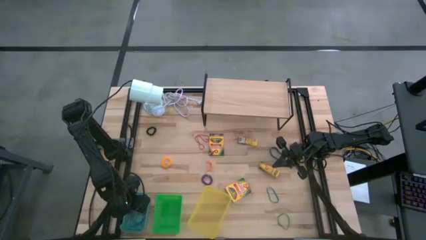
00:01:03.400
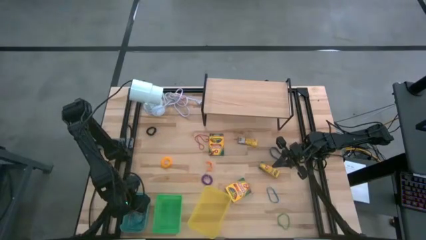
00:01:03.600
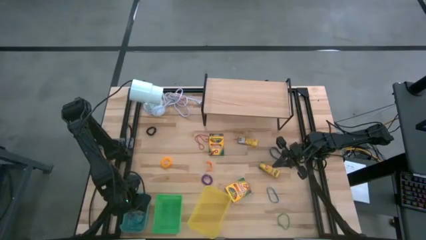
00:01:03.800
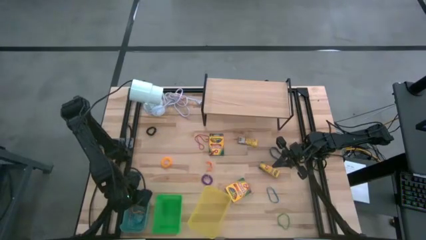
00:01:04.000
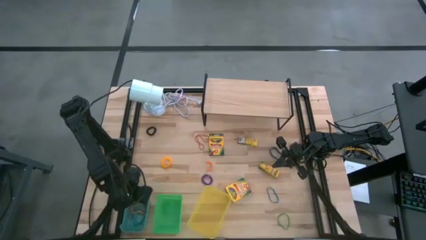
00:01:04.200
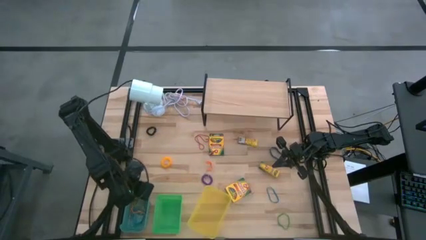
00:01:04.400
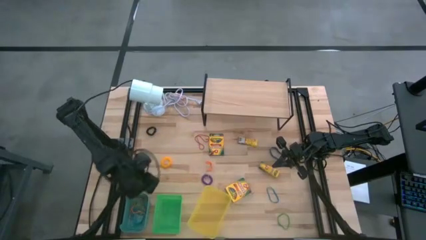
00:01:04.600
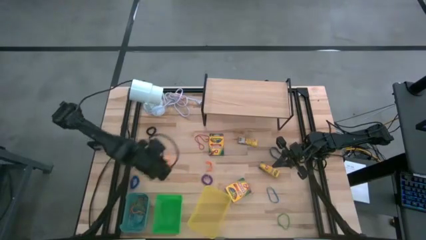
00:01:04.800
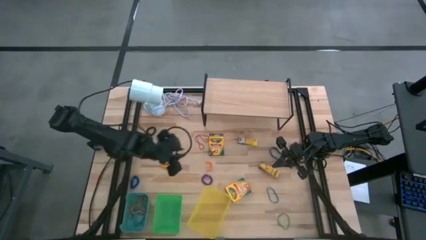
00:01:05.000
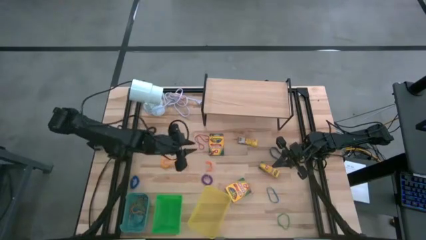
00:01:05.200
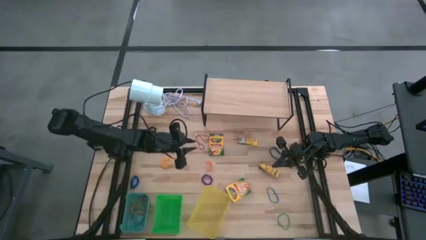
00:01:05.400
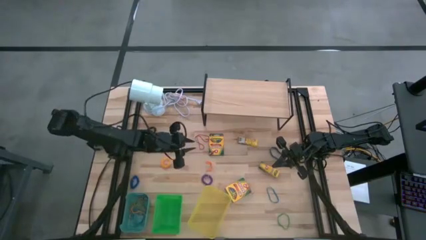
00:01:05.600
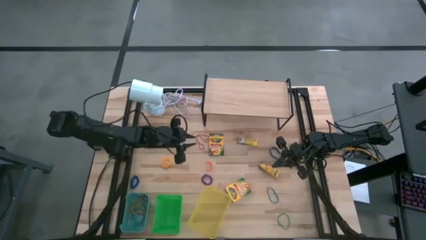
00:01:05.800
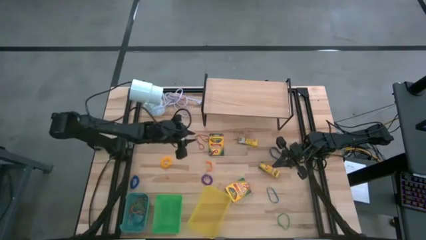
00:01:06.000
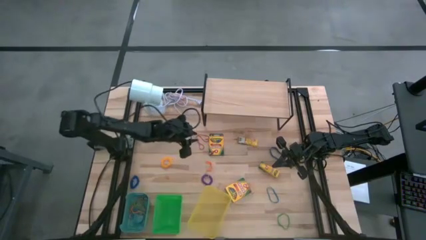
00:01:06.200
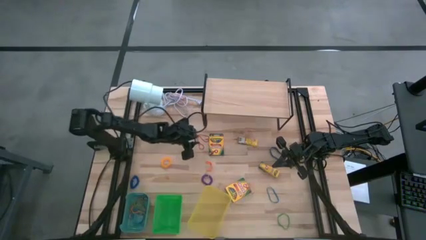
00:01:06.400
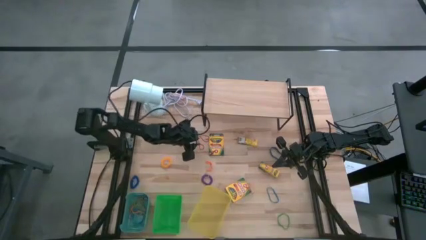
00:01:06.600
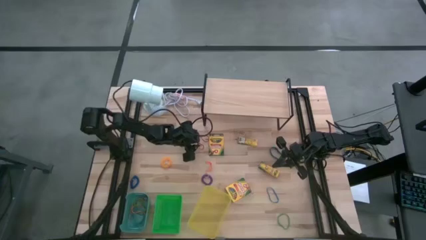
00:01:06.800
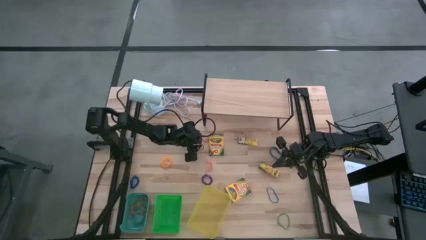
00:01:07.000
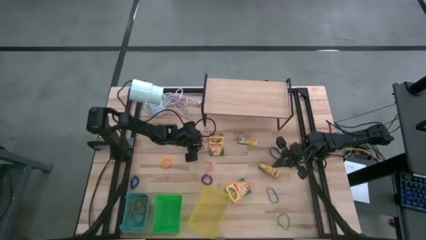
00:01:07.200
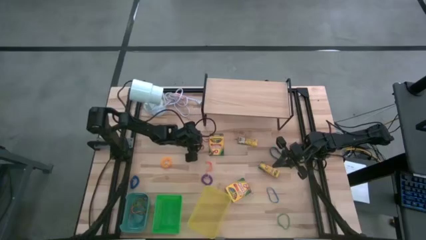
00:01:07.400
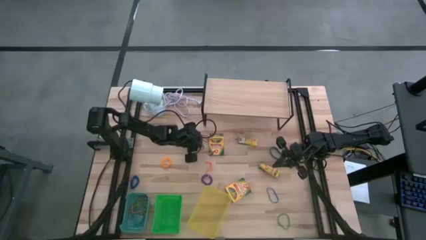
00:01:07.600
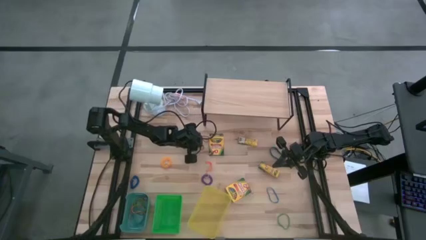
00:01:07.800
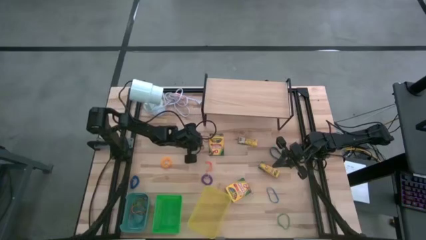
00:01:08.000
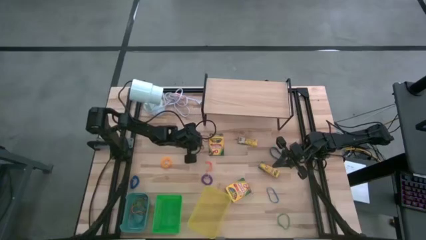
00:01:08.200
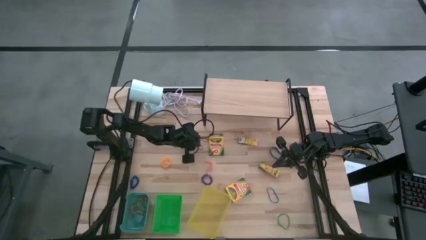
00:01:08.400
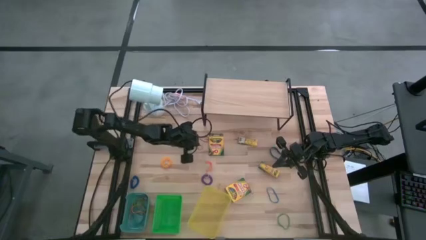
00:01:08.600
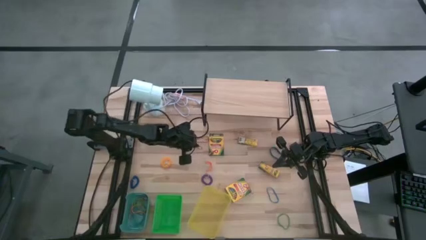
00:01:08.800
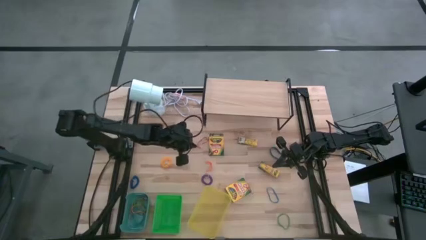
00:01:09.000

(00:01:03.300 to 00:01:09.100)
Task: Pick & Place Office Desk Supplies
Put the red rubberband into the blue bin

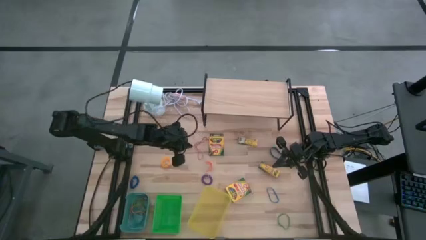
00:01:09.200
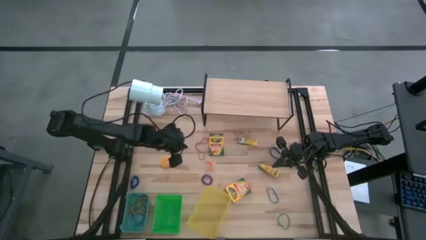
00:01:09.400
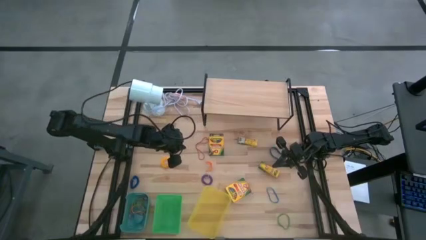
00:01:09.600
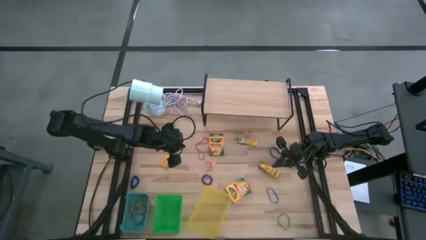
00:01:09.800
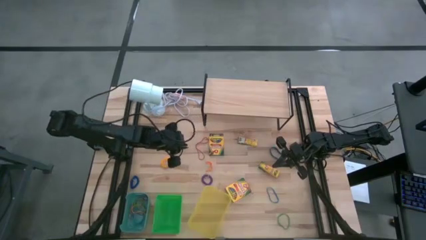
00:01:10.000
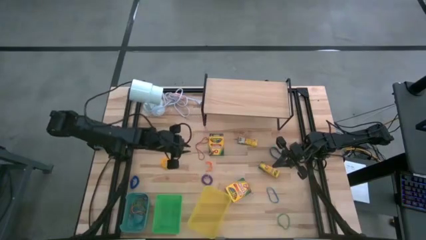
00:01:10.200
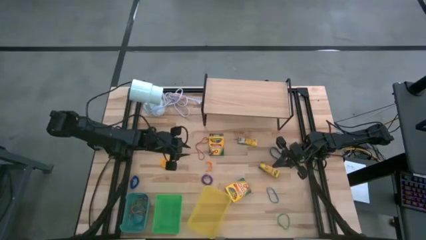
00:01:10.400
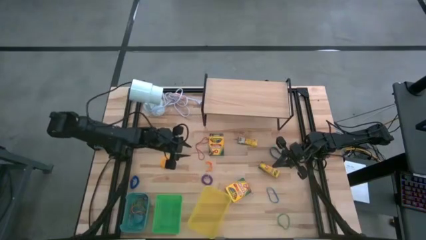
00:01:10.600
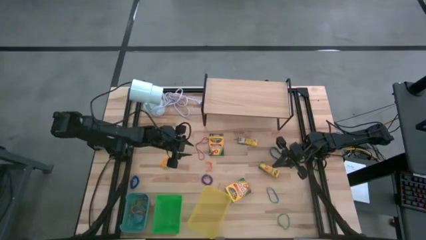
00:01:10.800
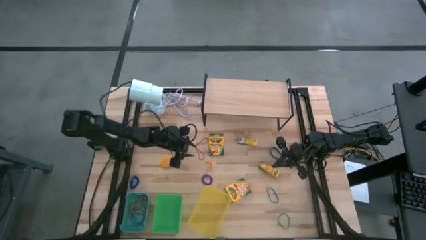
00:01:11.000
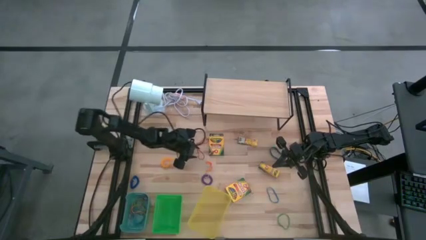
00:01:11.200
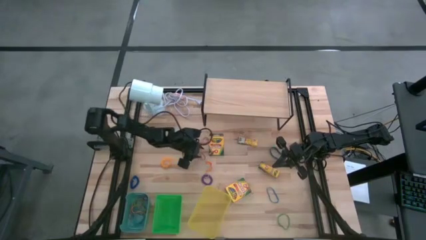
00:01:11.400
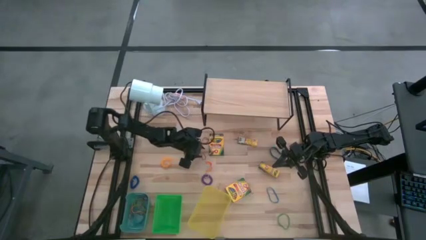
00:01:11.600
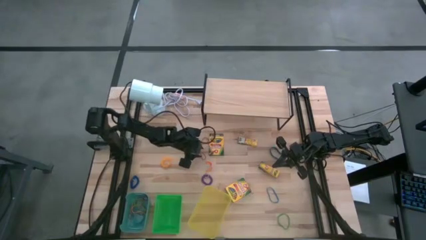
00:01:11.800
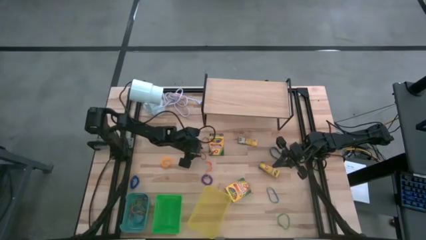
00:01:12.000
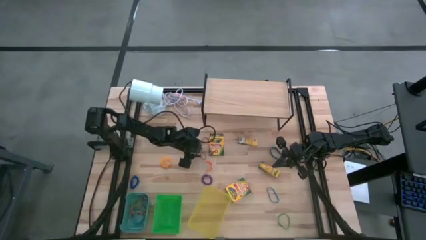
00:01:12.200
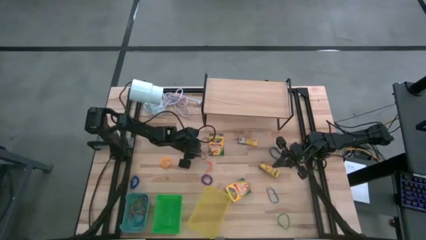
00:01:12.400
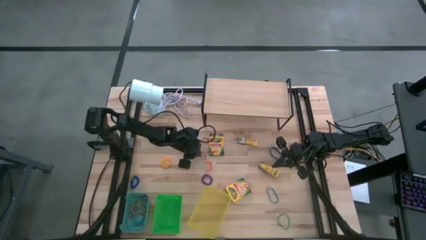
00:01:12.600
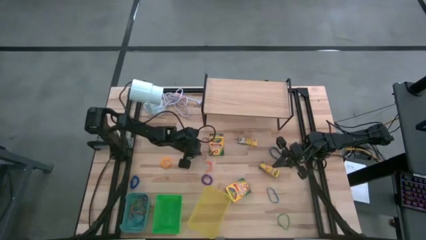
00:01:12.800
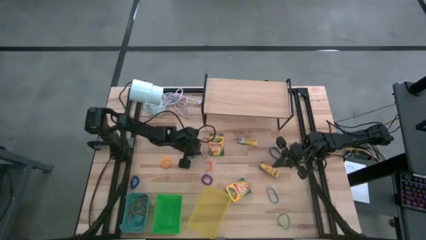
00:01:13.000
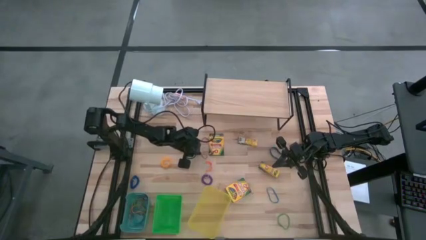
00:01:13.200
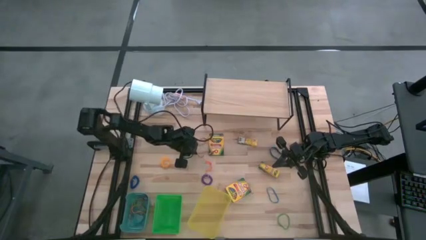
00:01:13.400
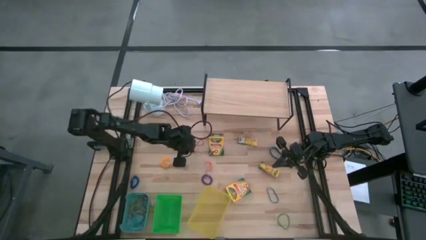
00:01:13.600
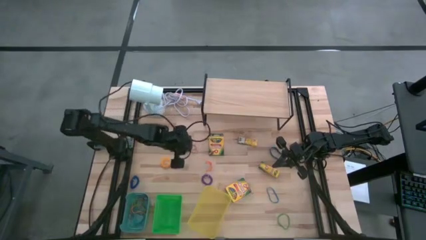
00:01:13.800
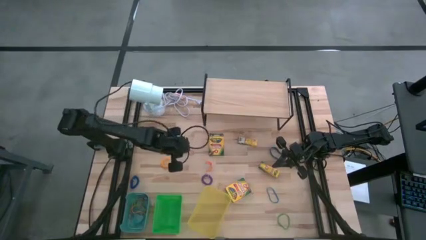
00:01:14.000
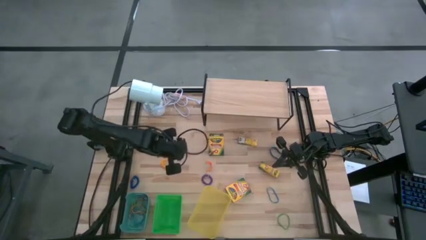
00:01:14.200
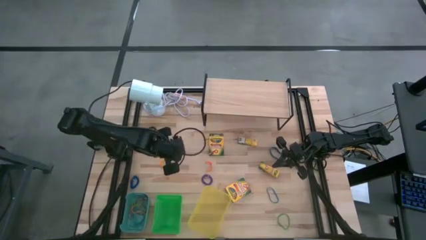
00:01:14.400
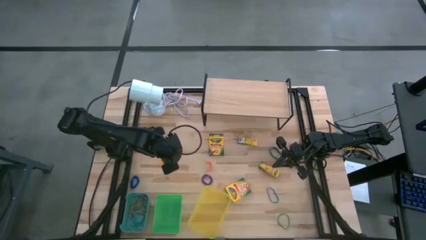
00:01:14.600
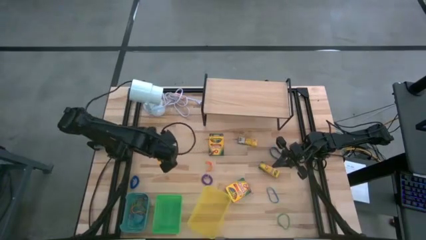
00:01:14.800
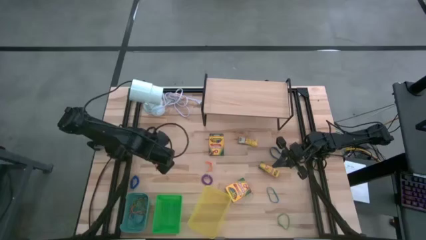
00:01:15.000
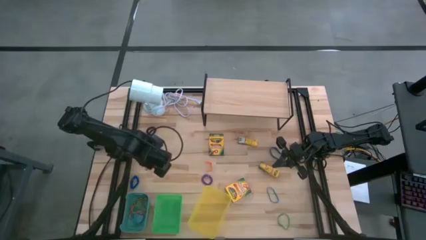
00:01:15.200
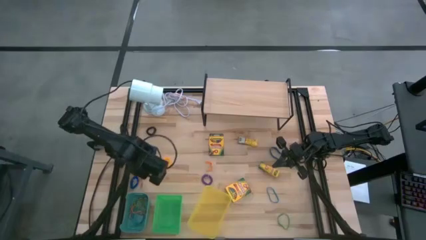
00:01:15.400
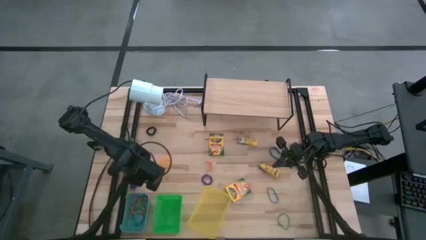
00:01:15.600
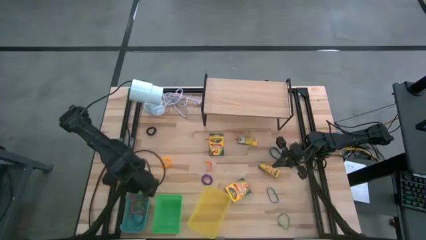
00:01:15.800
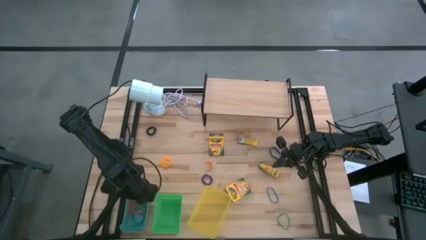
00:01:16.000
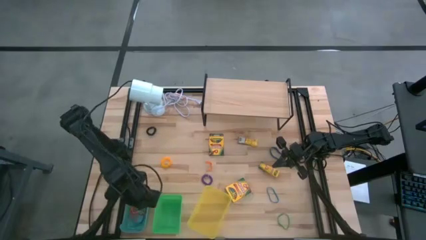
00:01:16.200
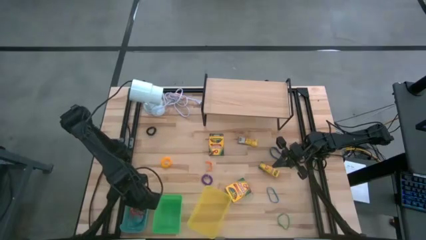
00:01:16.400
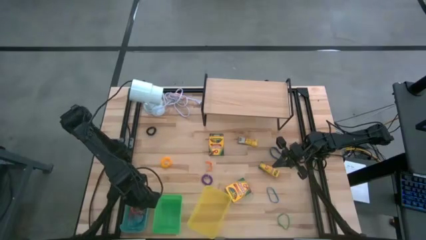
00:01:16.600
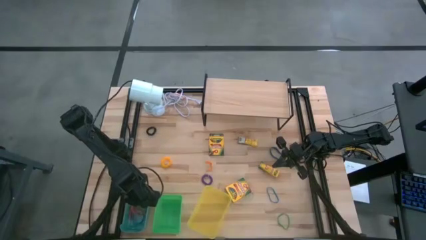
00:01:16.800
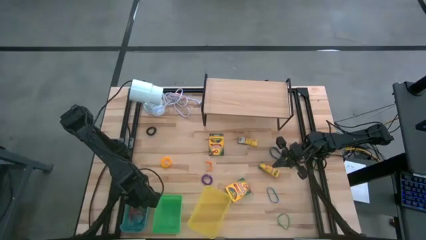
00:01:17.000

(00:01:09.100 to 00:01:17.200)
Put the red rubberband into the blue bin
